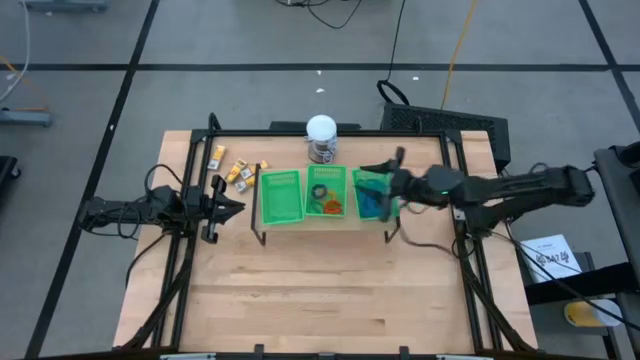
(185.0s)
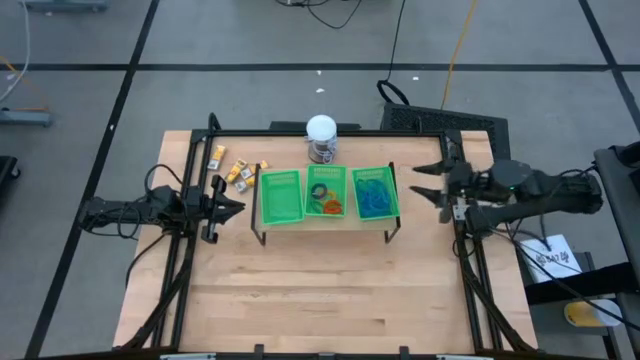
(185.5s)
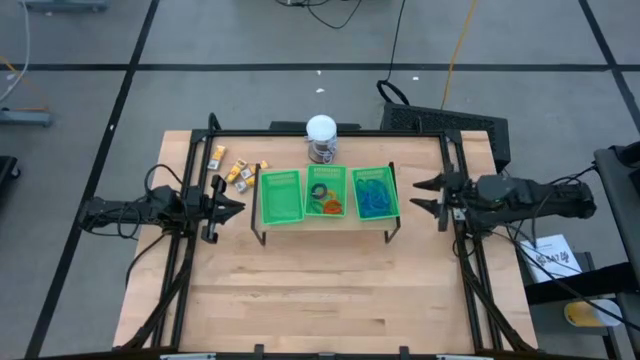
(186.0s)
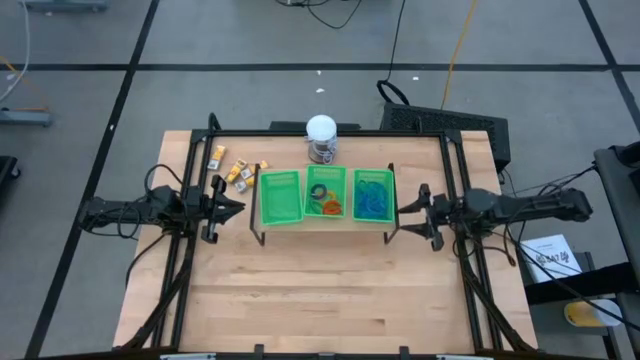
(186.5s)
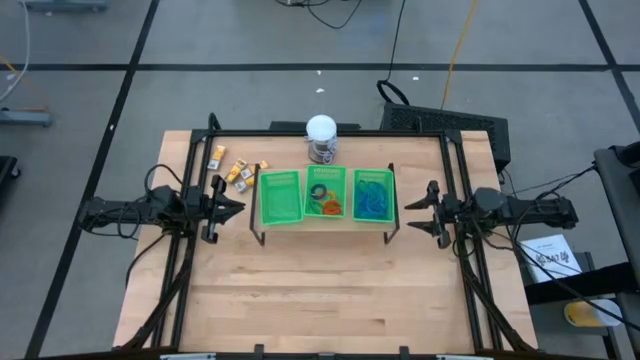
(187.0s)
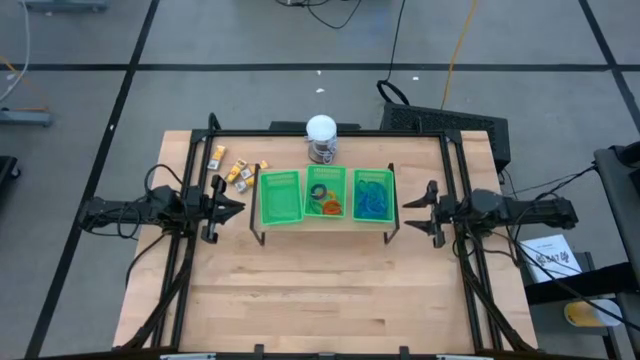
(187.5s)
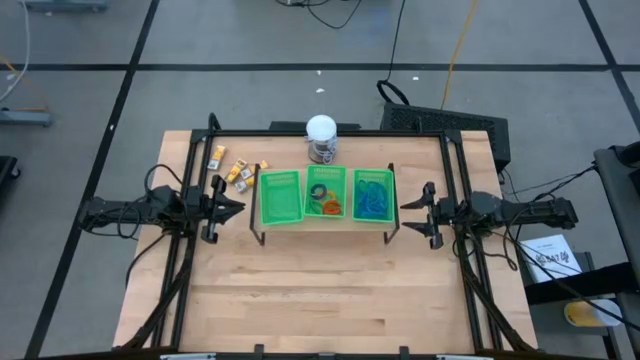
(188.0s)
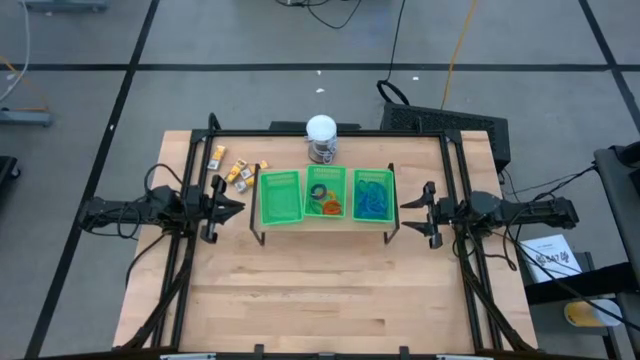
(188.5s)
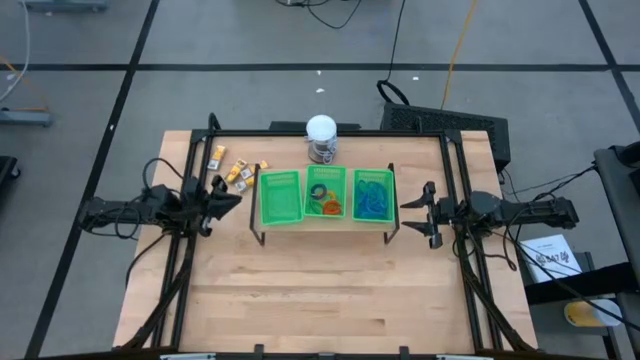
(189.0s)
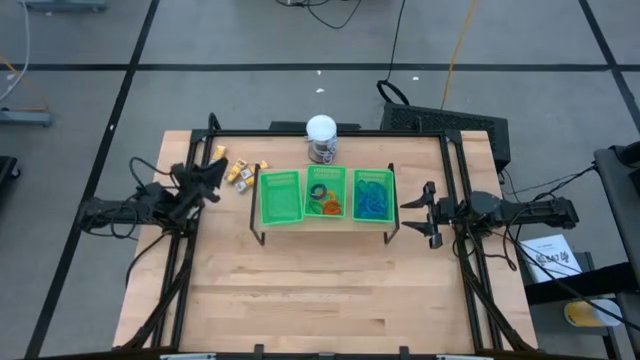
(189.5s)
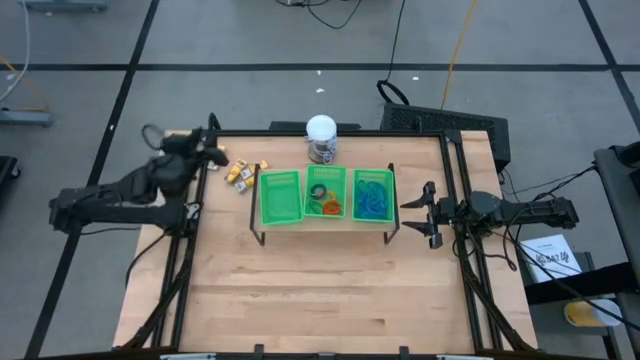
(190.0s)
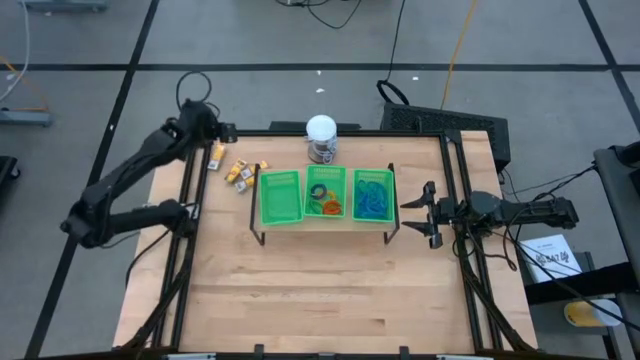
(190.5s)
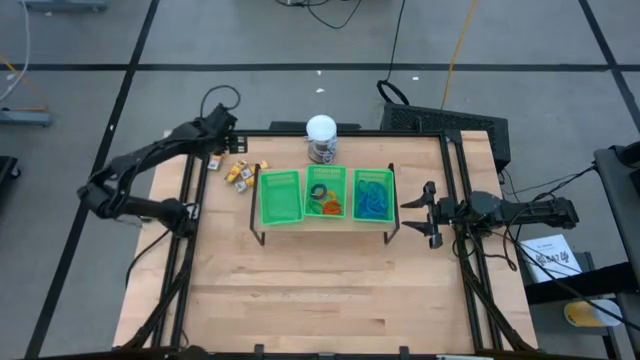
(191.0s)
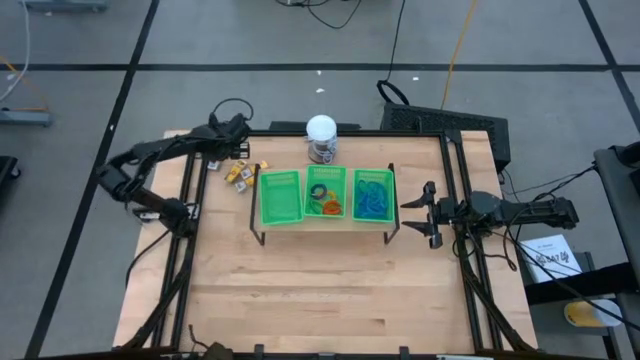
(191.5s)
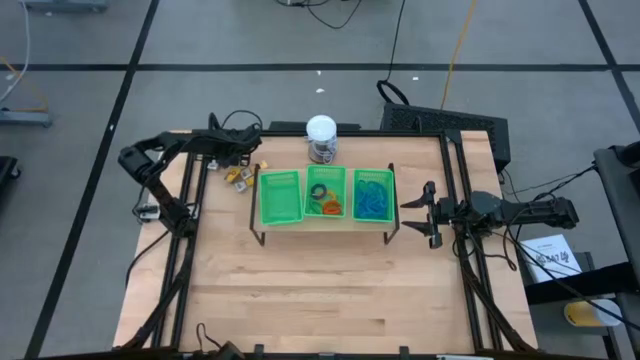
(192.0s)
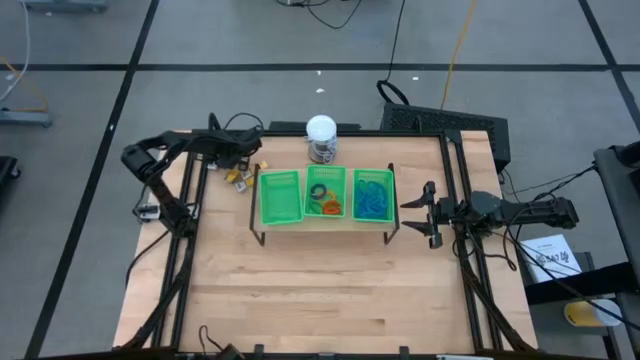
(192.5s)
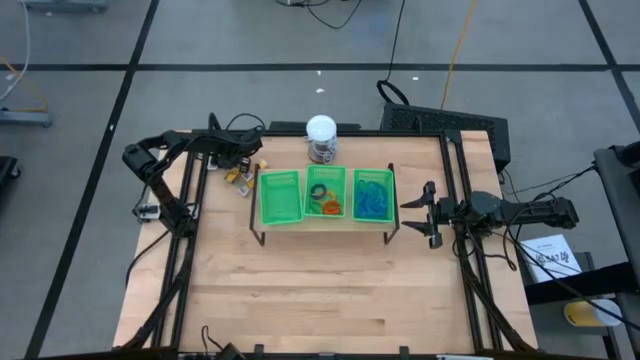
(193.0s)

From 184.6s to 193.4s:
Task: Pick & Place Office Desk Supplies
Put the crayon box into the left green bin on the shelf

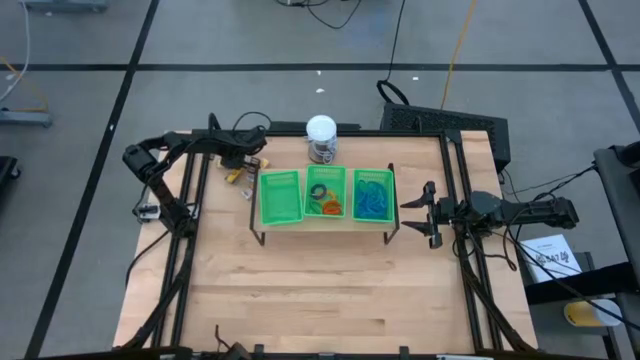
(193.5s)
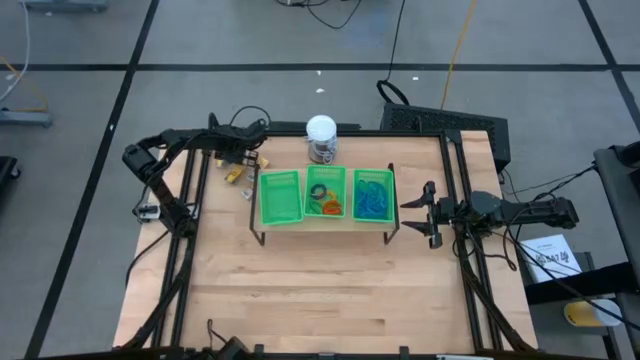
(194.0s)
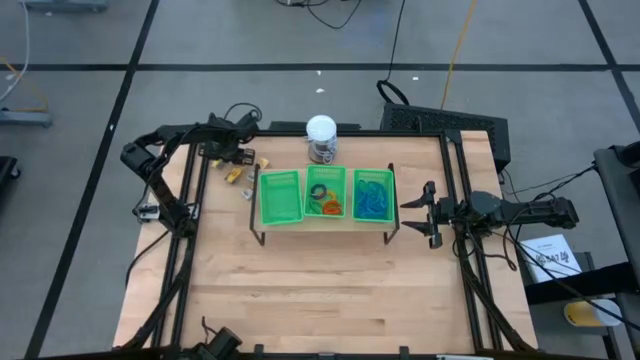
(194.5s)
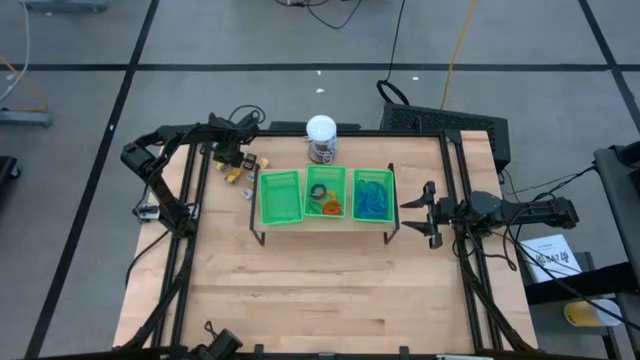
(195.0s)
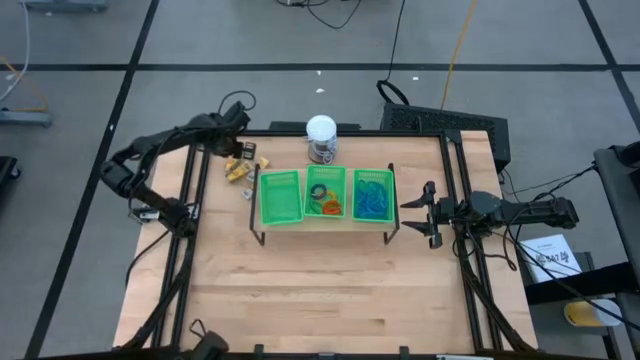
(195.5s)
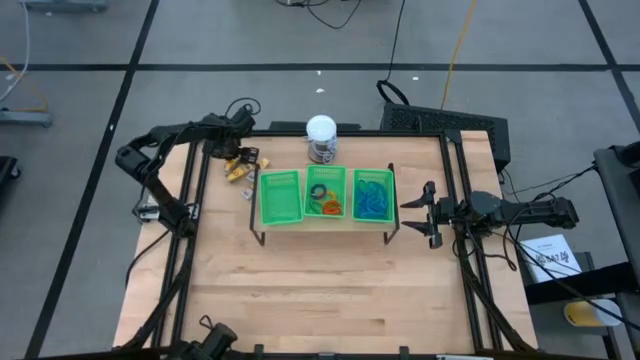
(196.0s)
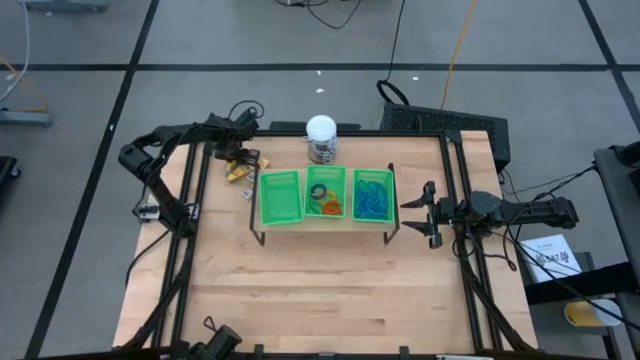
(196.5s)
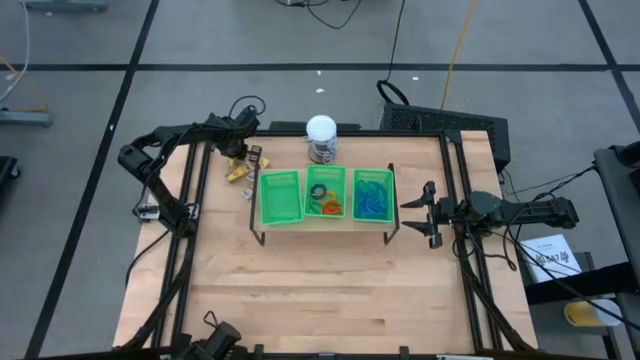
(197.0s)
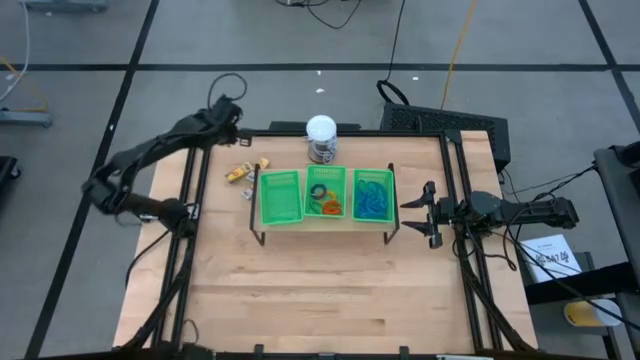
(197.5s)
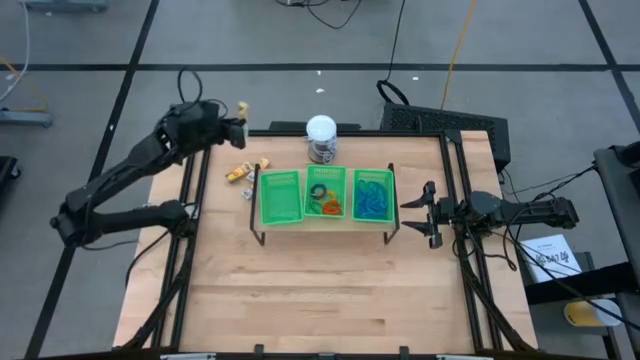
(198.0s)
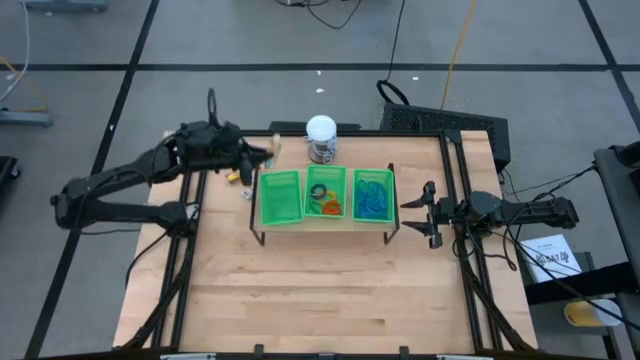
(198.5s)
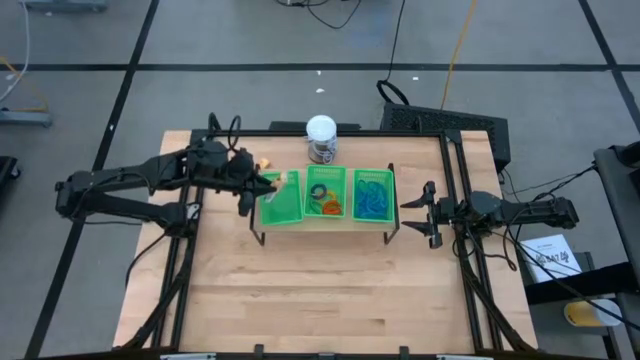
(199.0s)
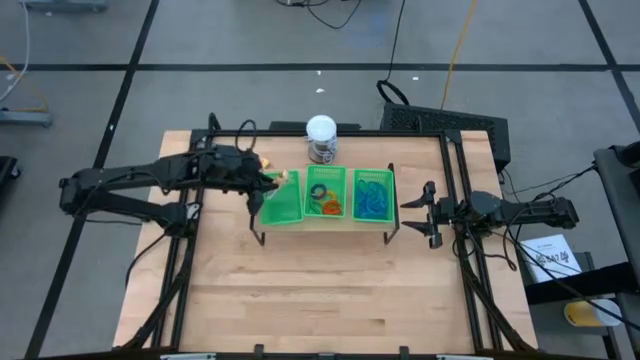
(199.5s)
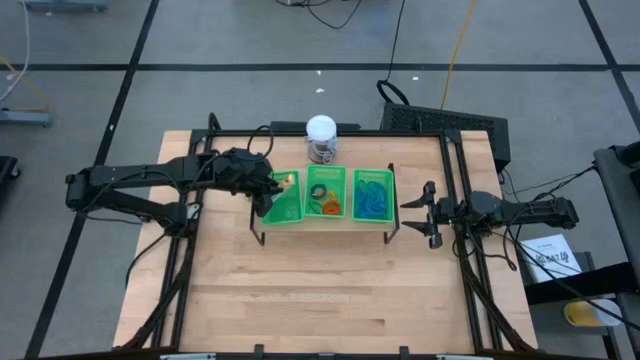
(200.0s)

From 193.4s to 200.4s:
Put the crayon box into the left green bin on the shelf

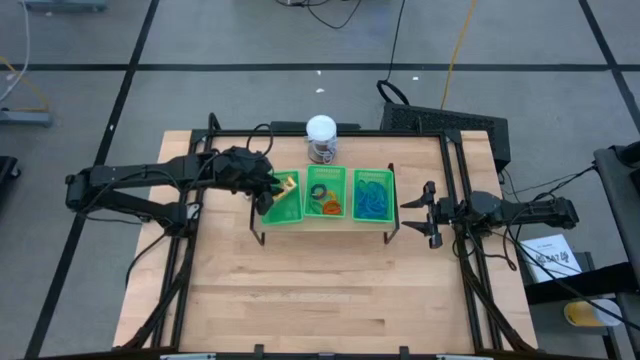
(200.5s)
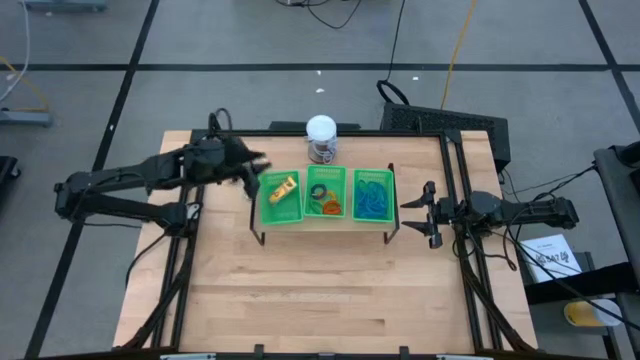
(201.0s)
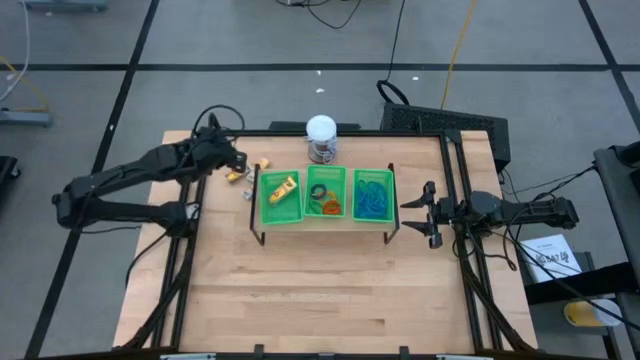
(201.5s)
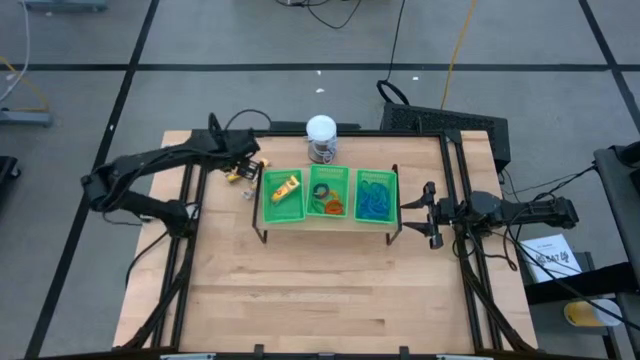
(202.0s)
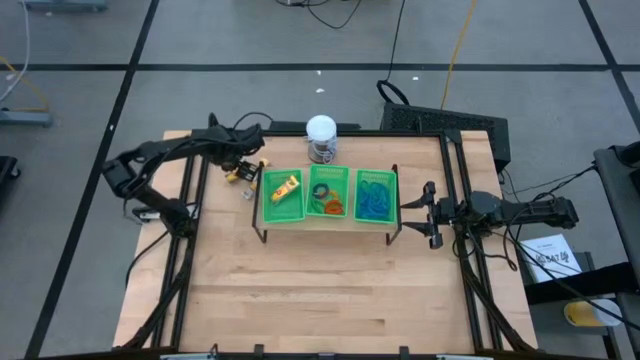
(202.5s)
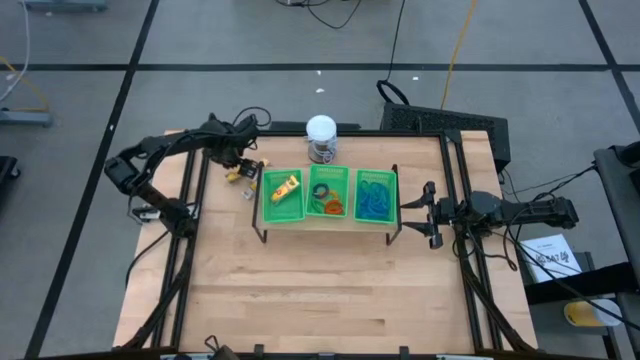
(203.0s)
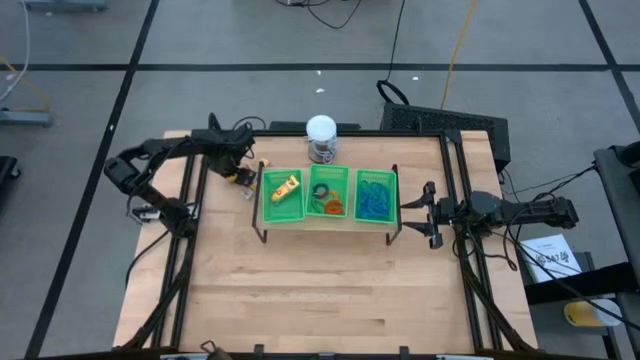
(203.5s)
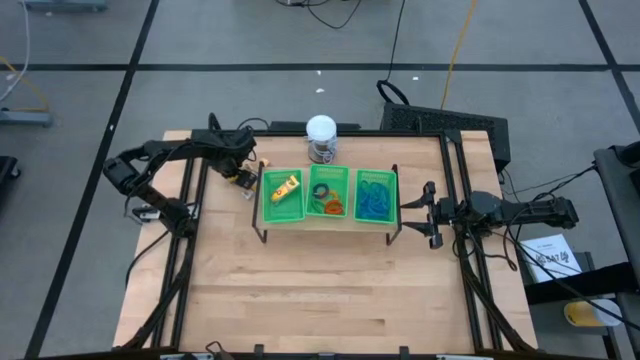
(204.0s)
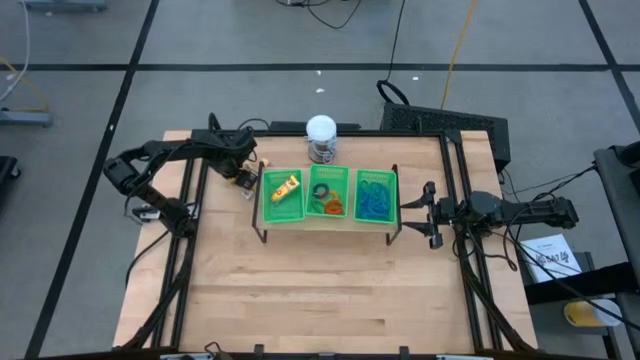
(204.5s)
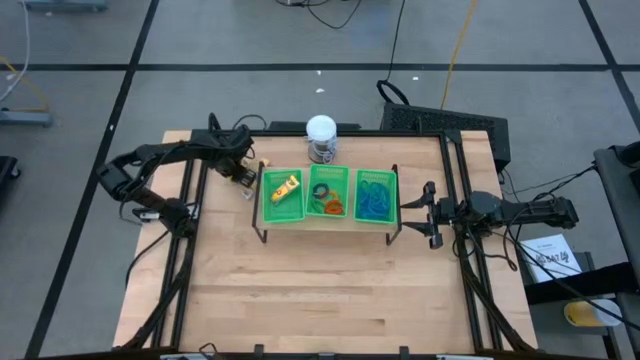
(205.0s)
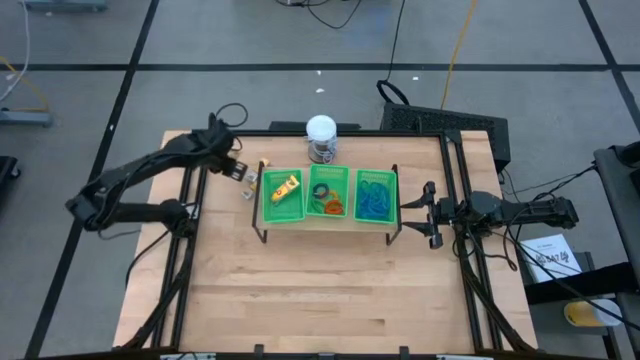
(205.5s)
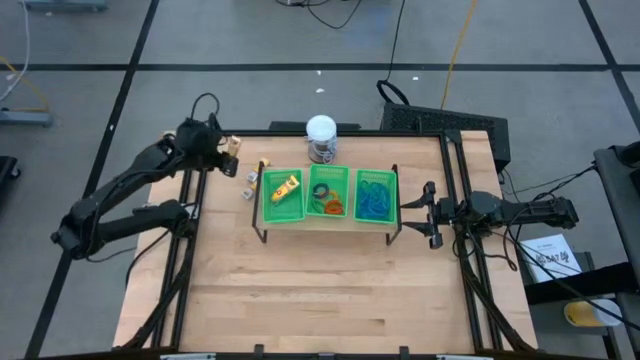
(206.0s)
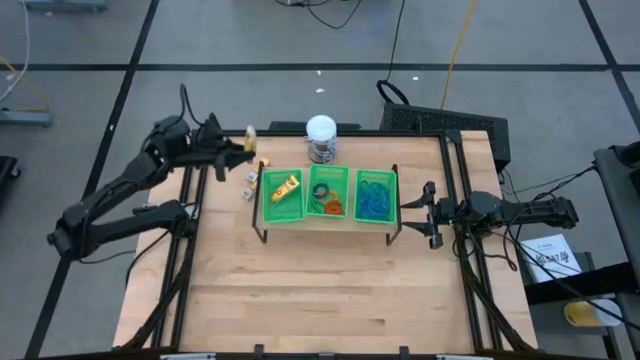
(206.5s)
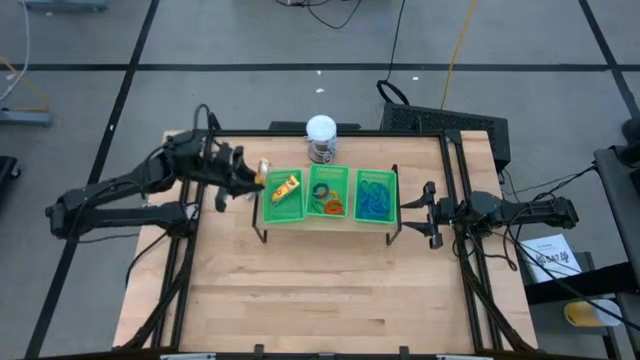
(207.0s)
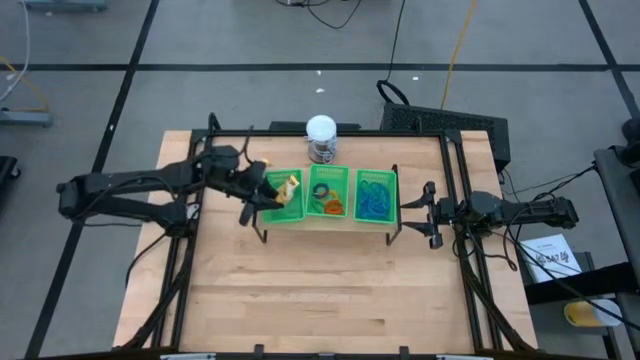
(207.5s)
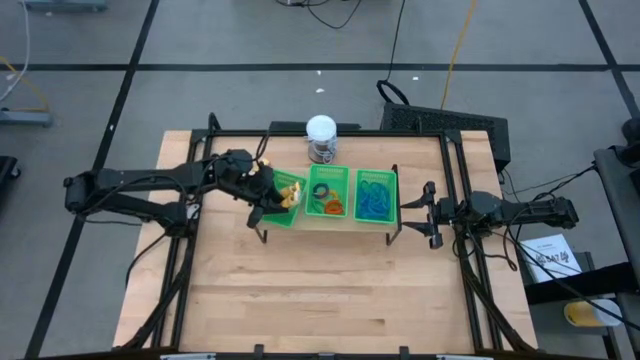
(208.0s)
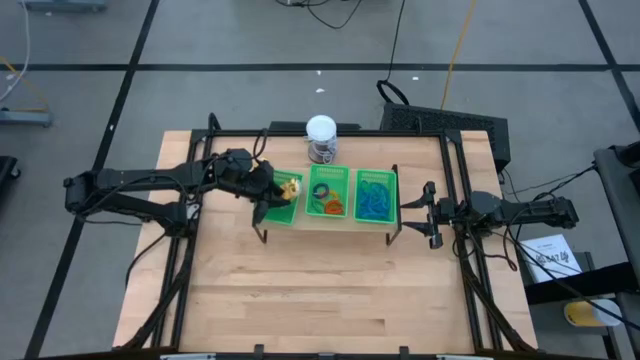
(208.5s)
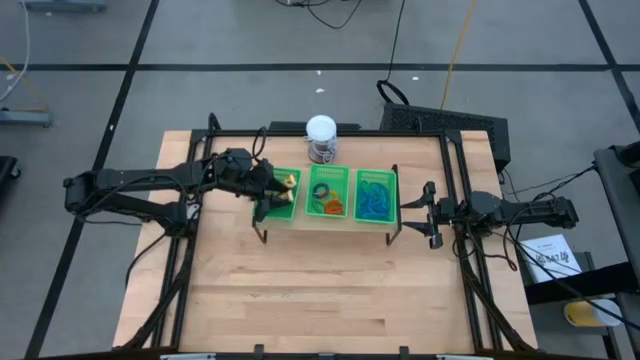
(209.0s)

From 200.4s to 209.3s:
Put the crayon box into the left green bin on the shelf
